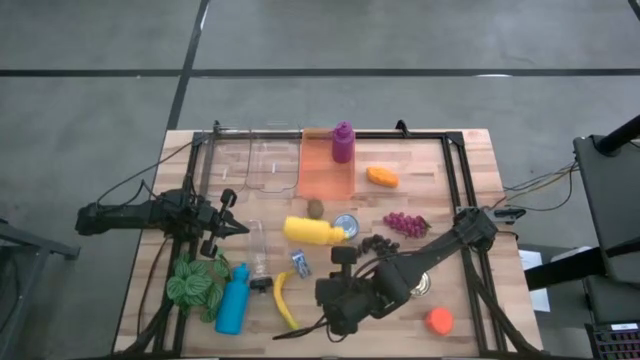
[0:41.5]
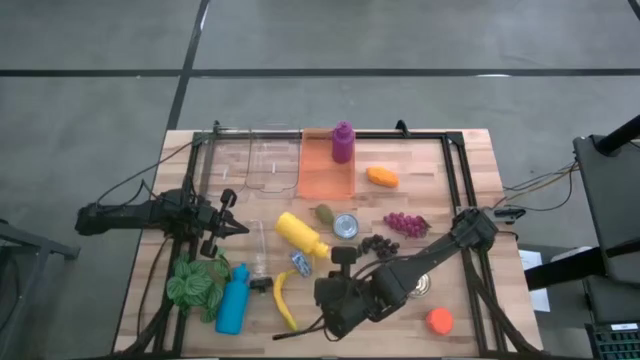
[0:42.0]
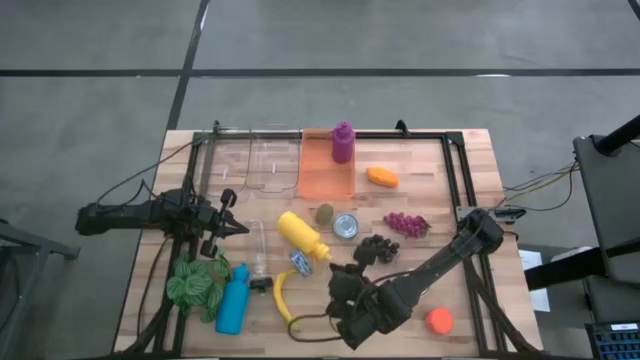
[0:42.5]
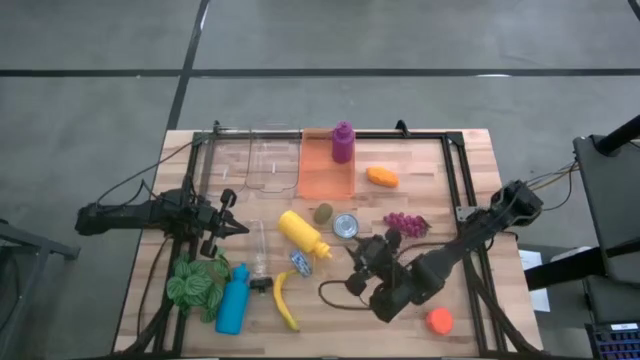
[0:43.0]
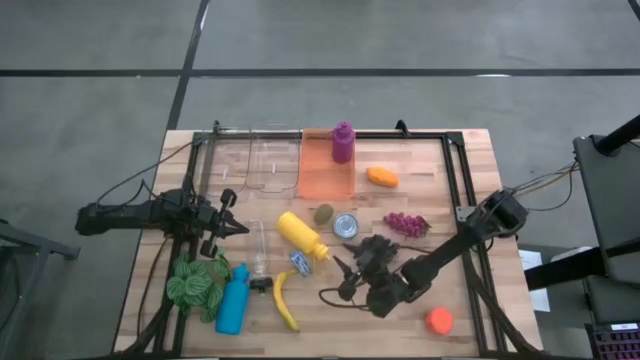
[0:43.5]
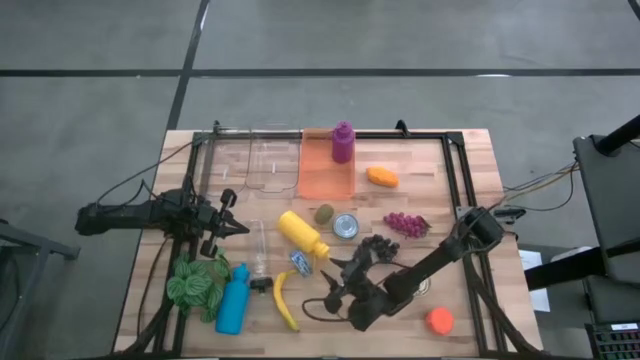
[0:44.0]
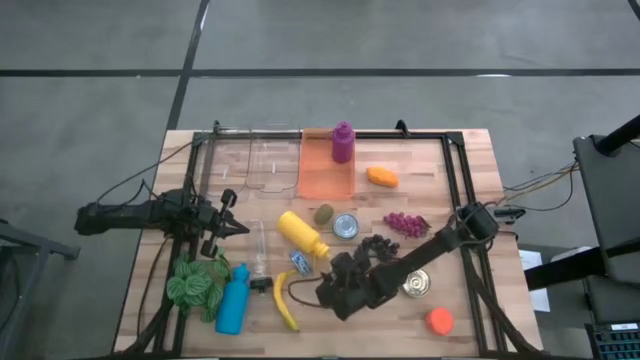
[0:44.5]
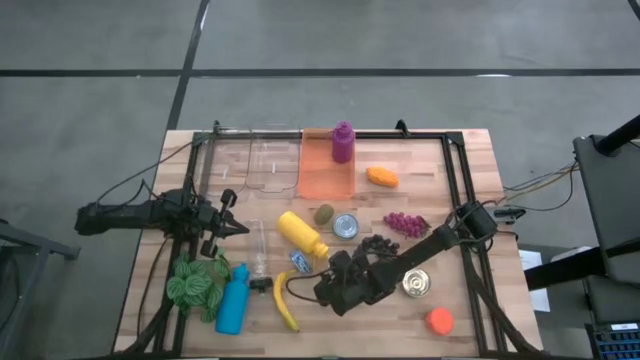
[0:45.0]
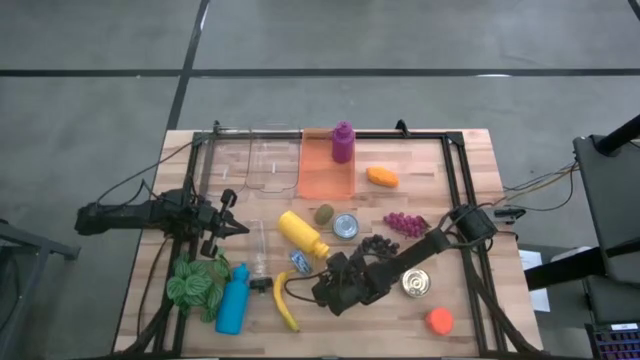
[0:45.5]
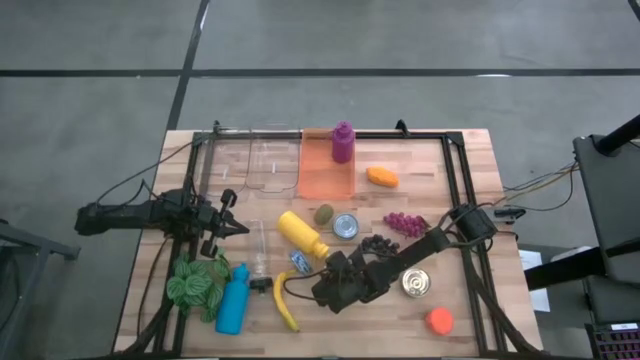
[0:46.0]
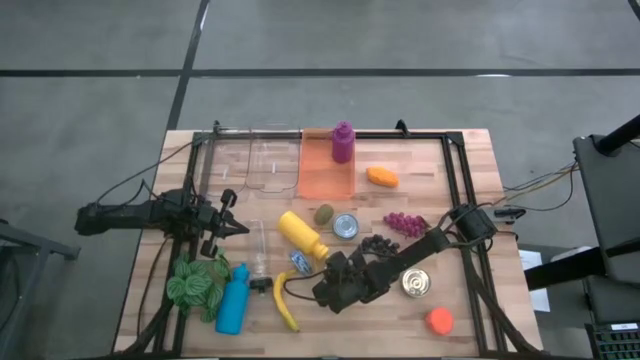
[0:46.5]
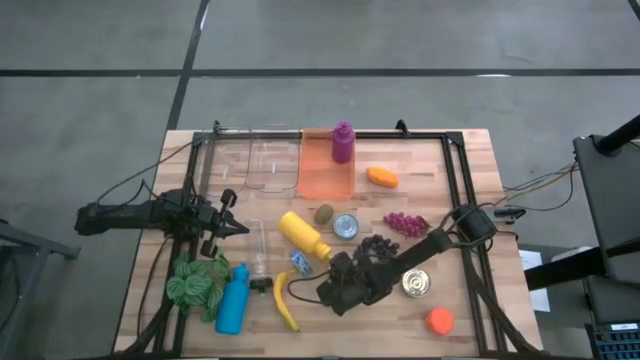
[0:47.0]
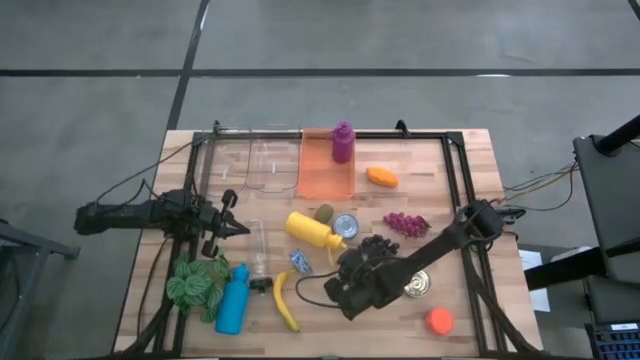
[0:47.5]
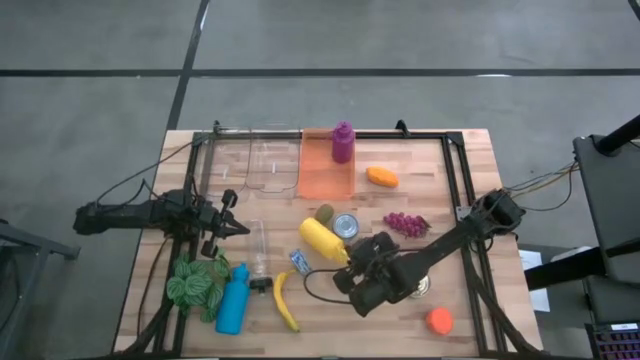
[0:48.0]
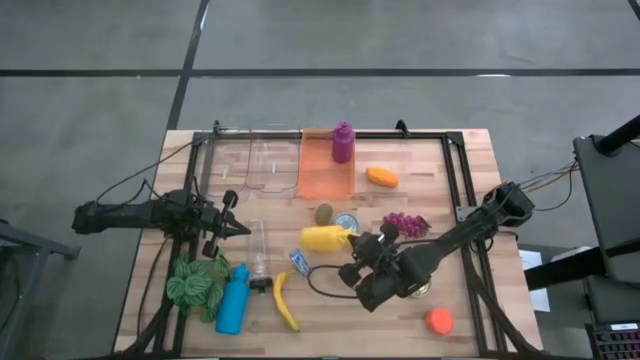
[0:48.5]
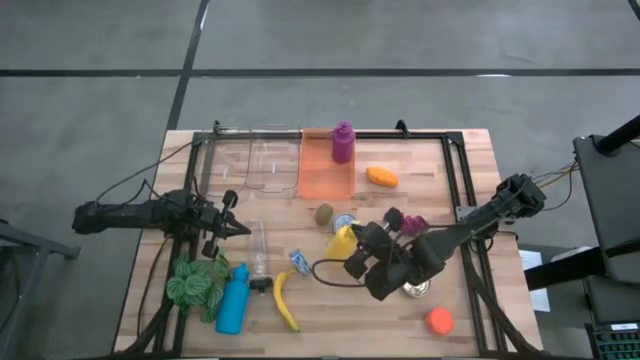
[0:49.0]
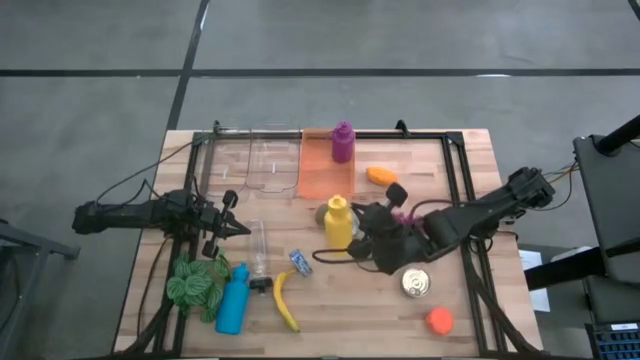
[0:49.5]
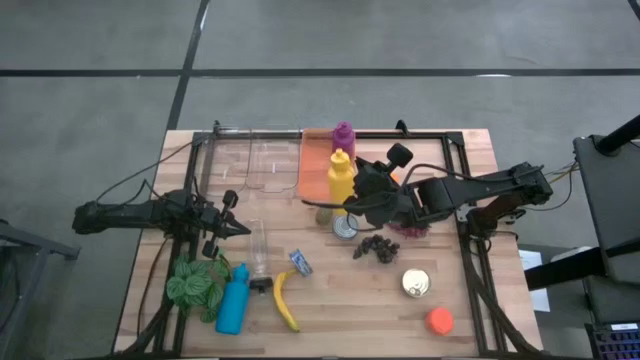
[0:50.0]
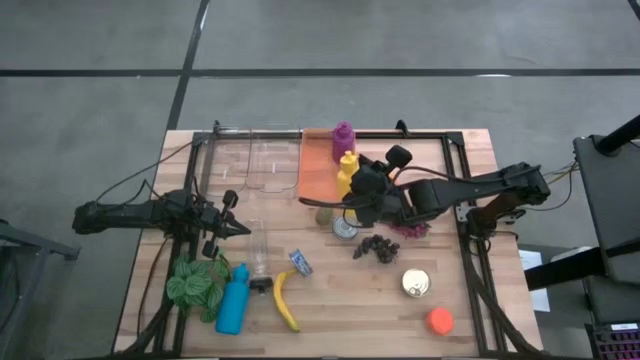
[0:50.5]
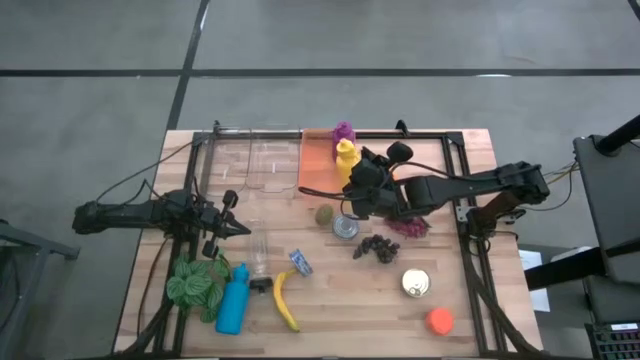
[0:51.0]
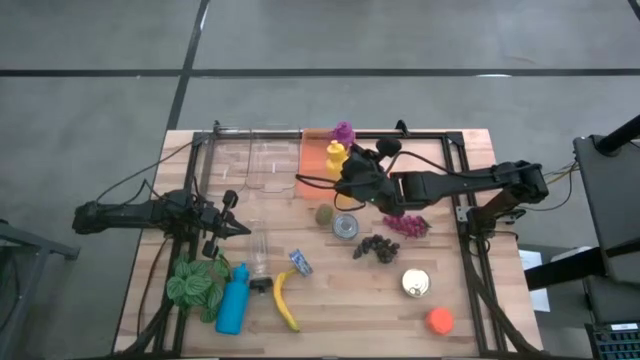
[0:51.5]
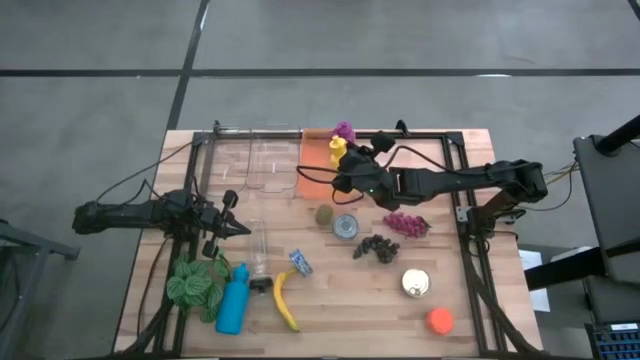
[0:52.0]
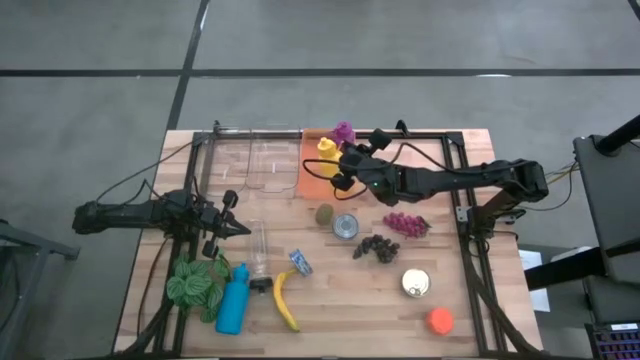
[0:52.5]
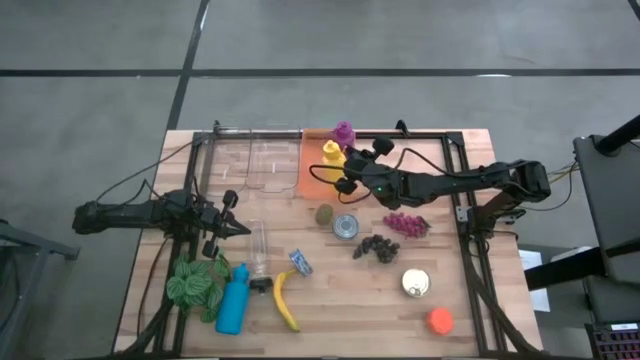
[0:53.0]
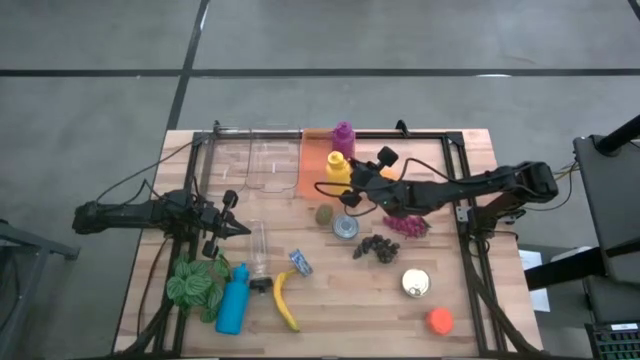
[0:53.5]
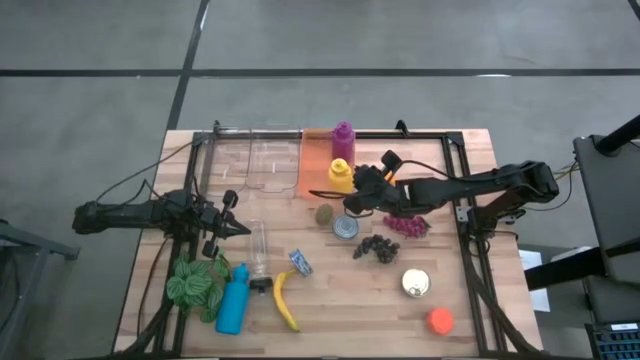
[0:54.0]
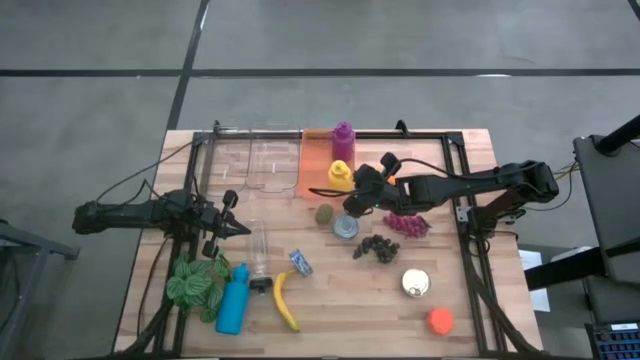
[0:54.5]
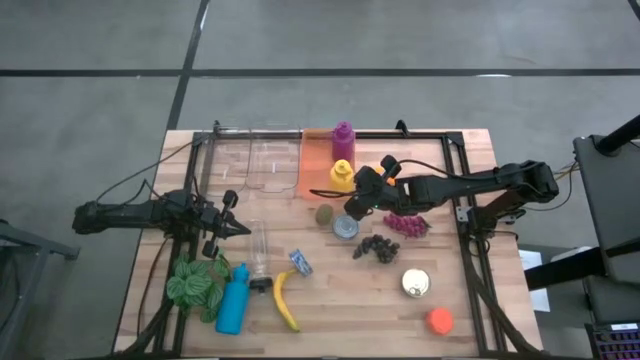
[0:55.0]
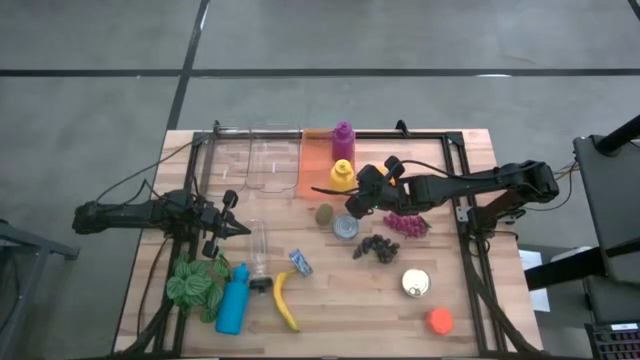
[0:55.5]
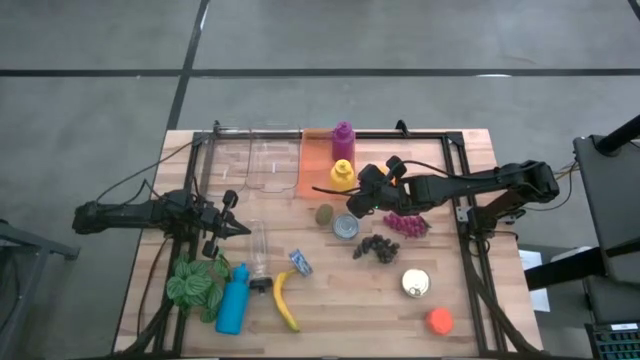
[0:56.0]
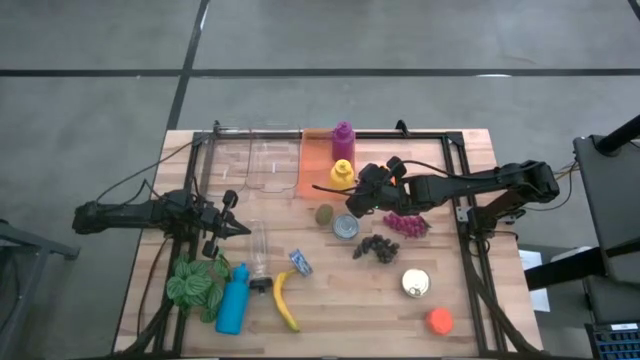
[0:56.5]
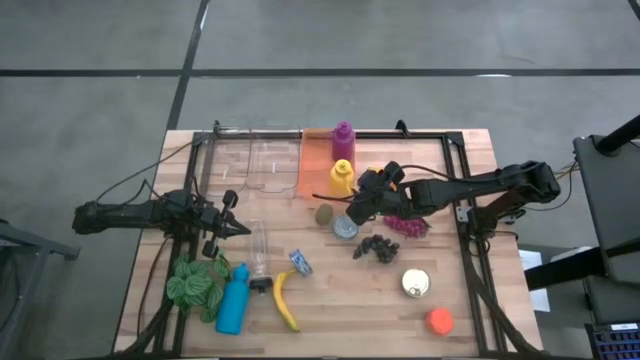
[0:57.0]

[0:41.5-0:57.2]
Task: Pick & Place Food Item
Put the yellow tumbler into the orange bin
